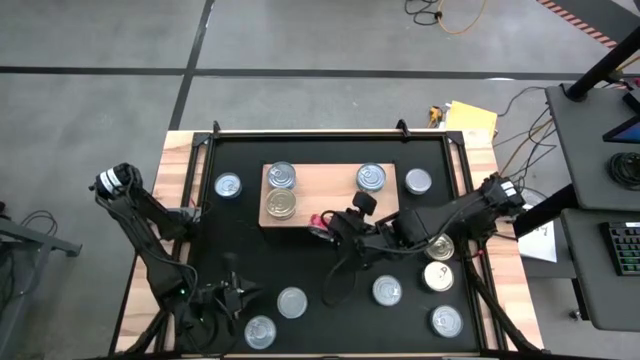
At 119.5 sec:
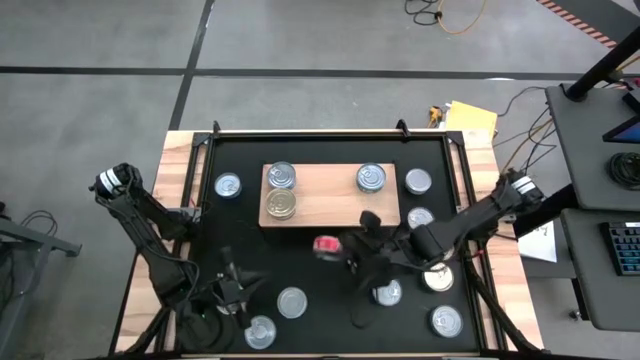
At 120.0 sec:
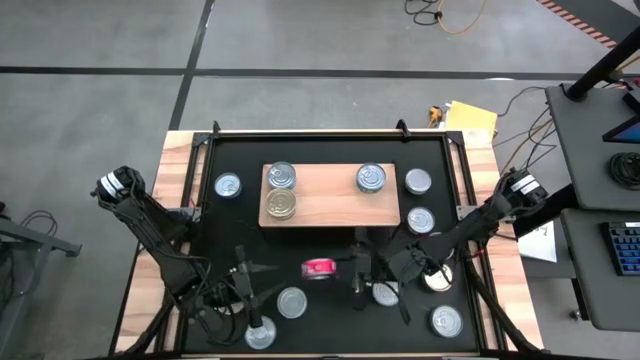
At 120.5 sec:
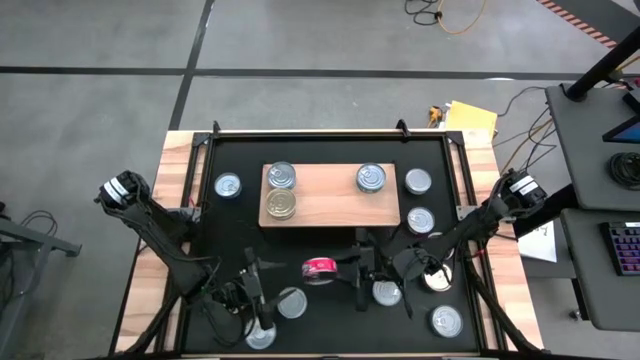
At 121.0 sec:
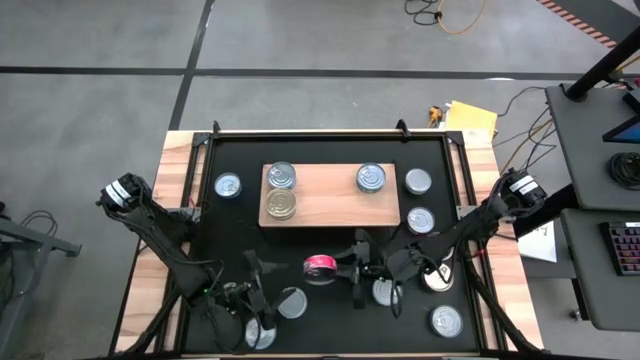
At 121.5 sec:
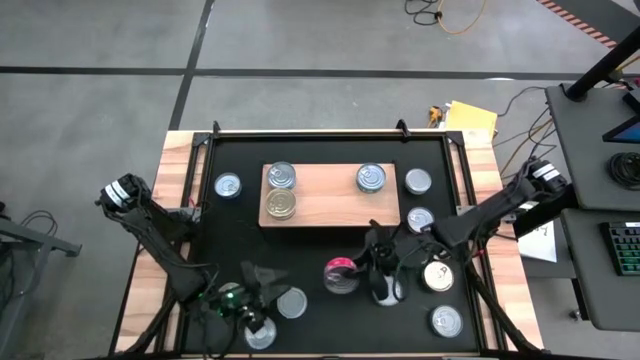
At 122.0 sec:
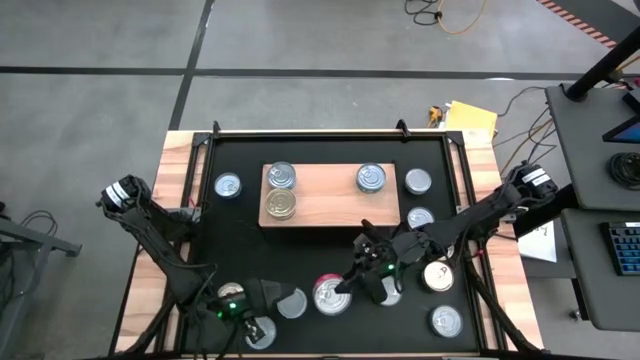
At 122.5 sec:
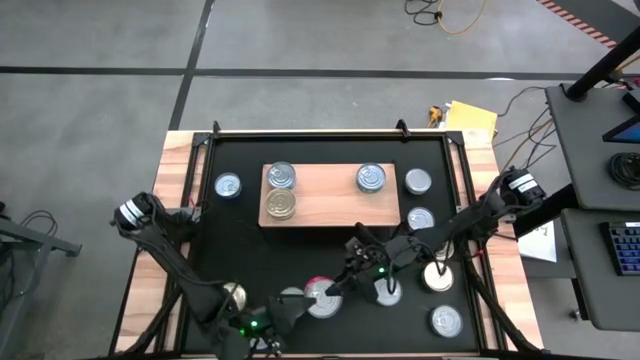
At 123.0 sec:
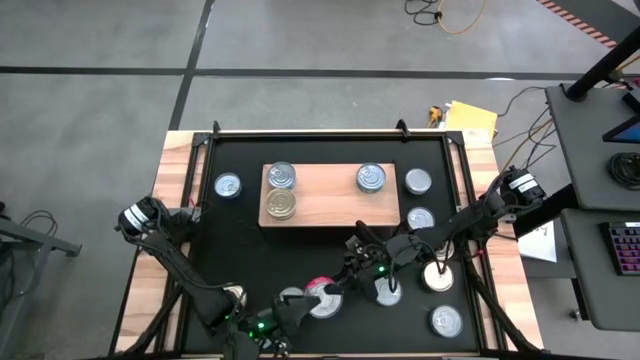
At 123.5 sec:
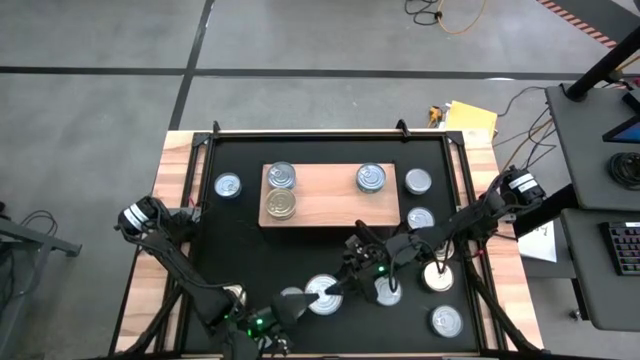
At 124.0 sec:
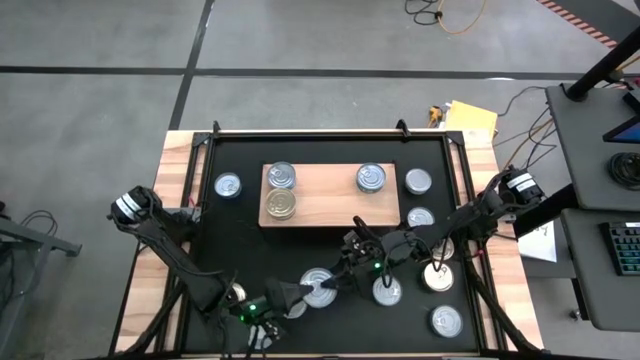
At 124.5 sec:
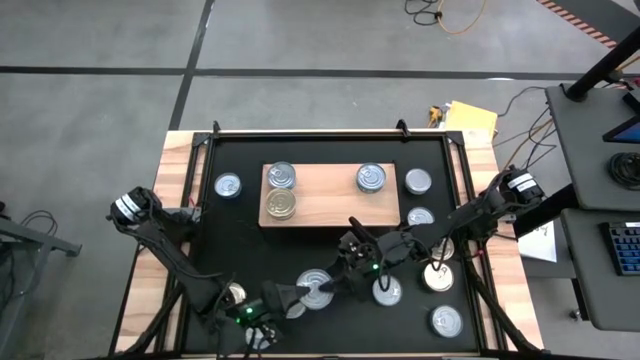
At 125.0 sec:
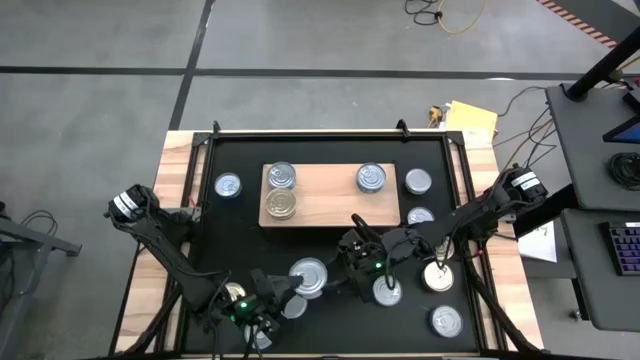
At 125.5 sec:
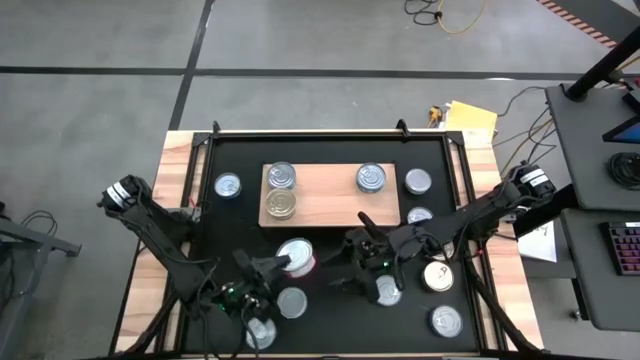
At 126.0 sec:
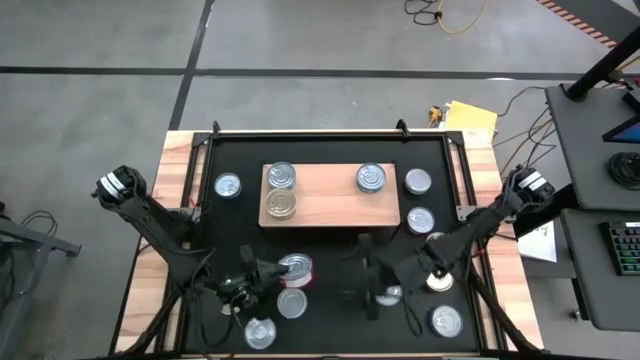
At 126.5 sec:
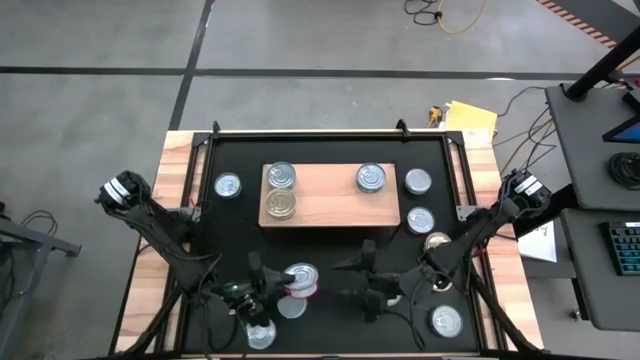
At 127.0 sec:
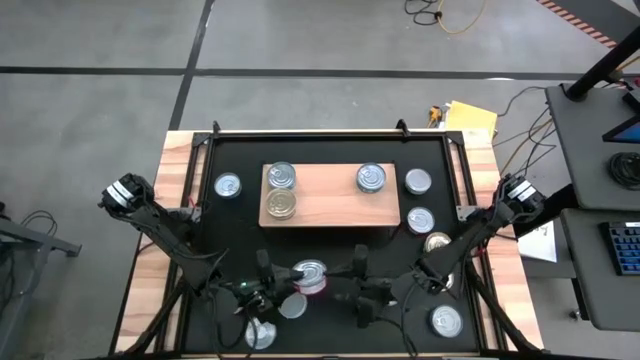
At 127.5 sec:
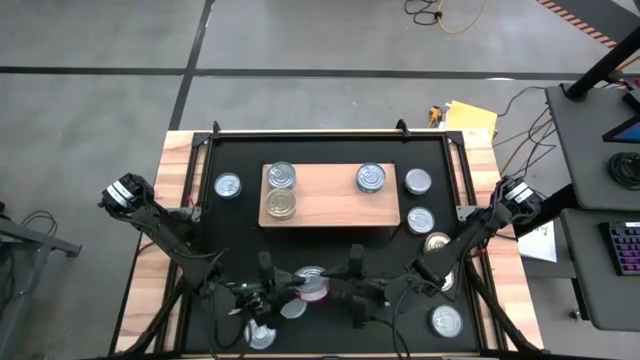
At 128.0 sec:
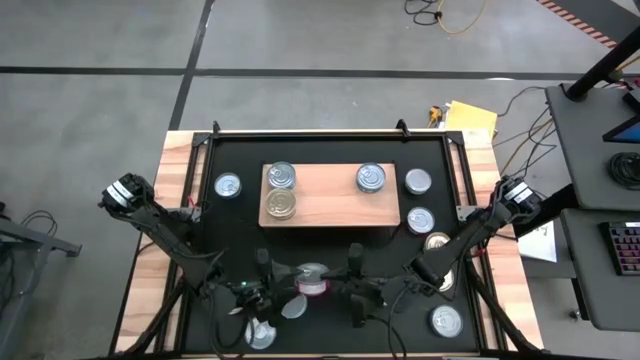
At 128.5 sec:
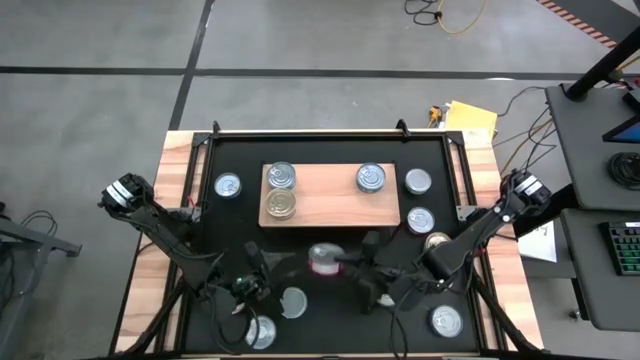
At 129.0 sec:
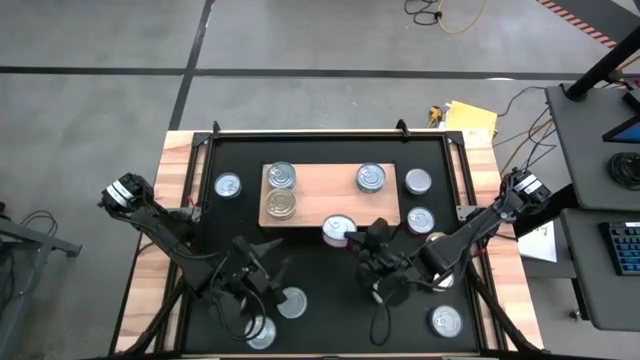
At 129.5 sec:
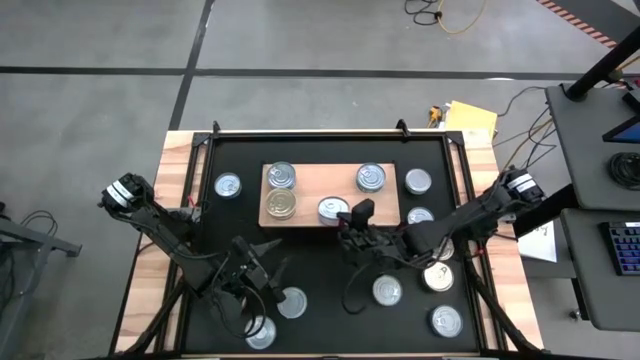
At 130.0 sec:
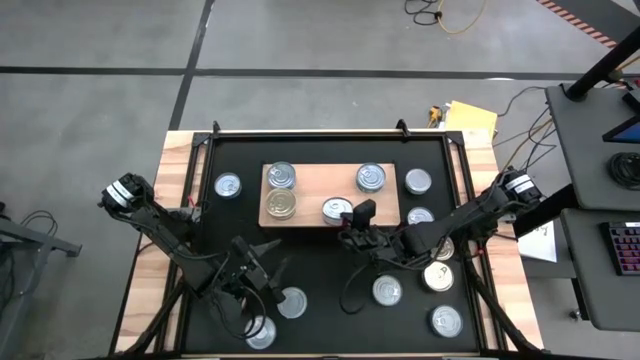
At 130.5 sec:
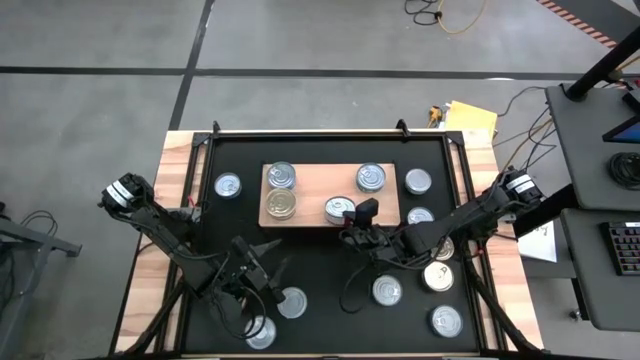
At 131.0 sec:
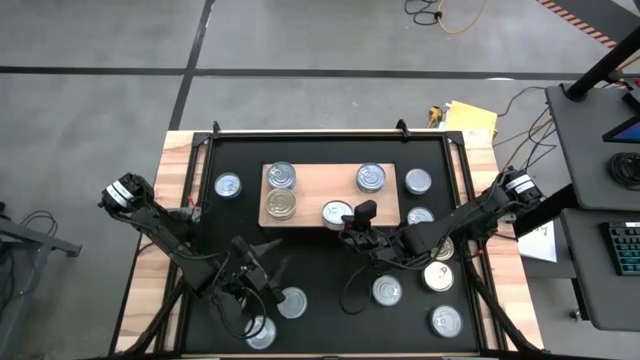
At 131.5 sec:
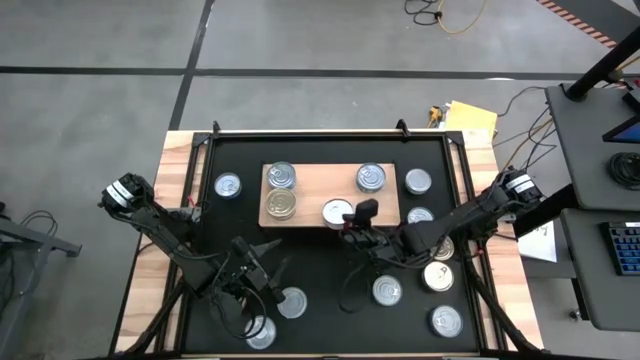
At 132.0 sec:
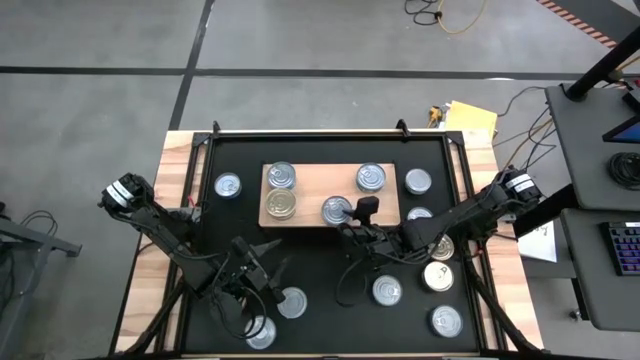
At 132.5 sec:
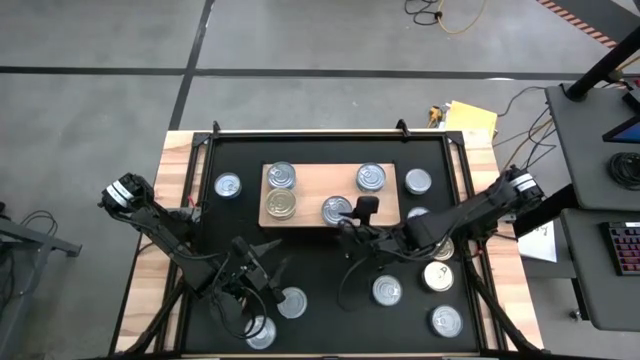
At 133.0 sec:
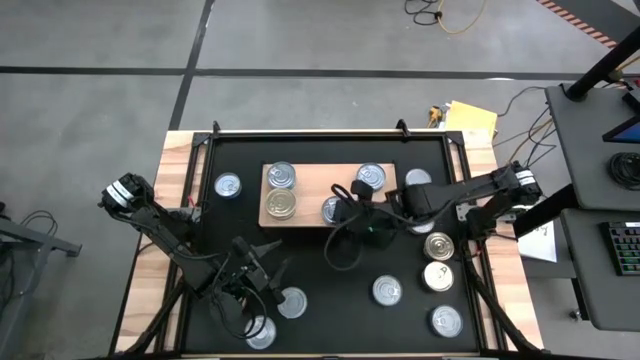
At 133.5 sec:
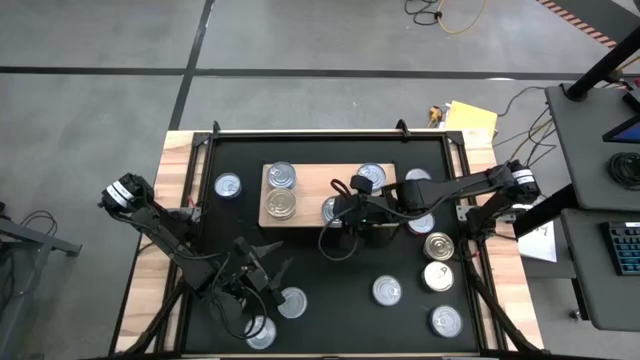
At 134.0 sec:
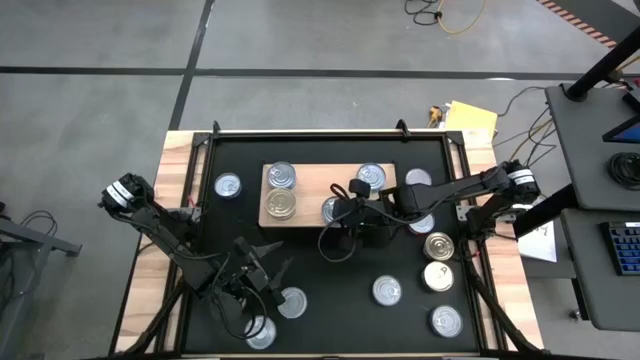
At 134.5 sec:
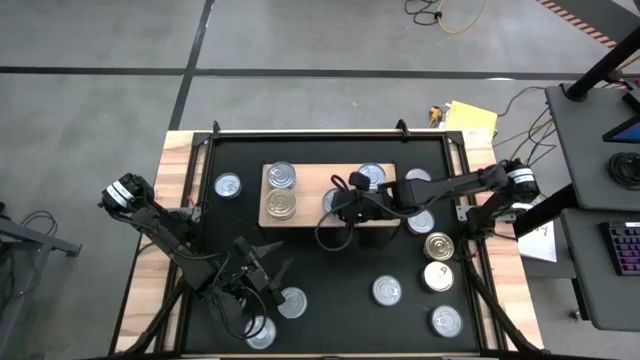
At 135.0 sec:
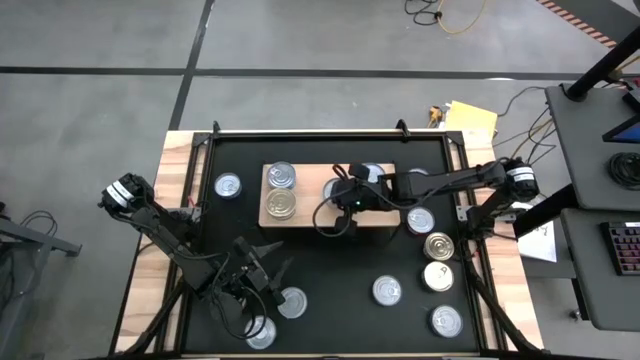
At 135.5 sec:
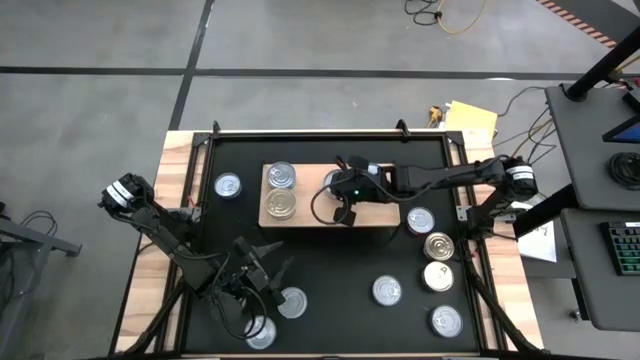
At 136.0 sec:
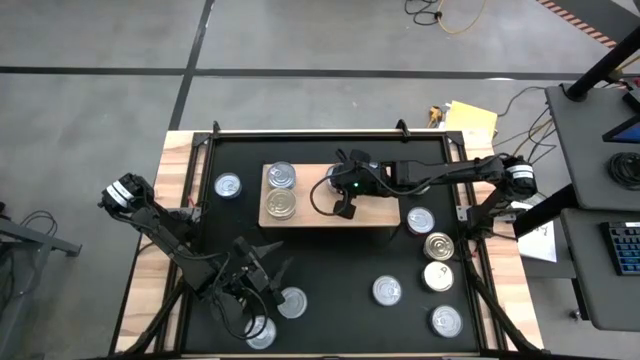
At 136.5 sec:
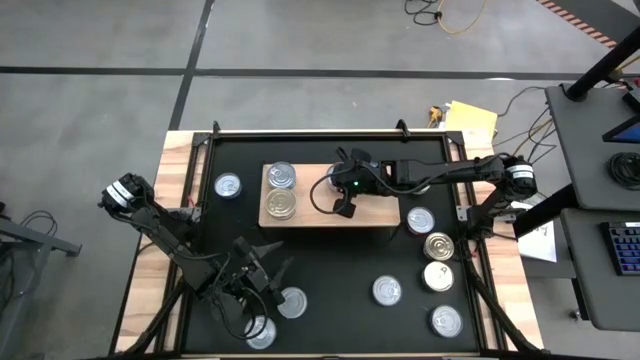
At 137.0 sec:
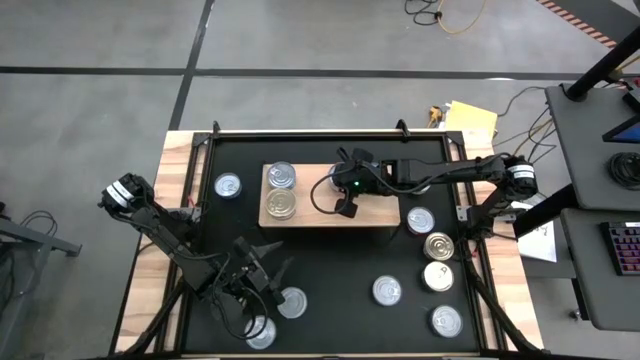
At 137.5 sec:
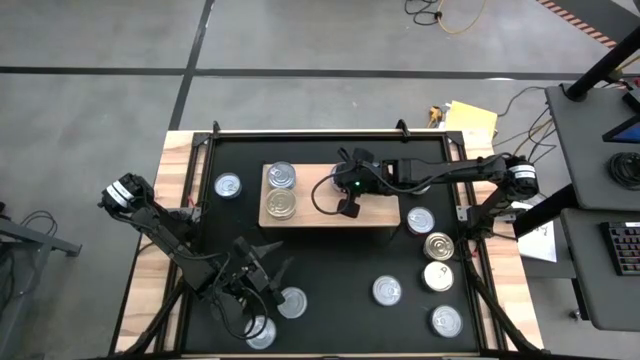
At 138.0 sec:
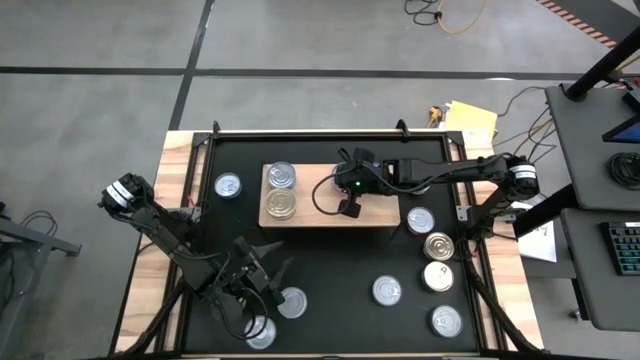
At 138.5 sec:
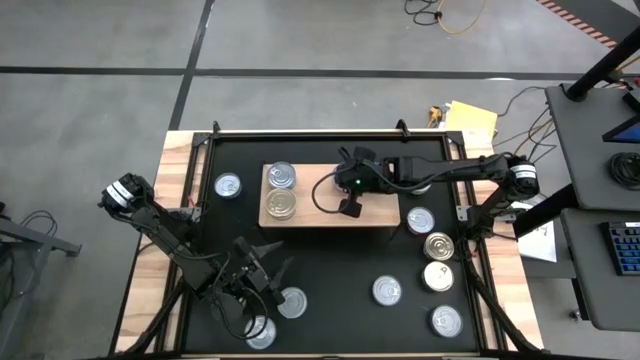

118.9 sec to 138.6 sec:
Task: Stack canned seafood by type on shelf
Put the red tuna can on the shelf
